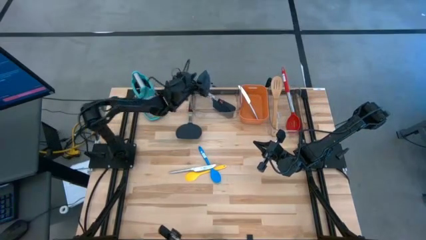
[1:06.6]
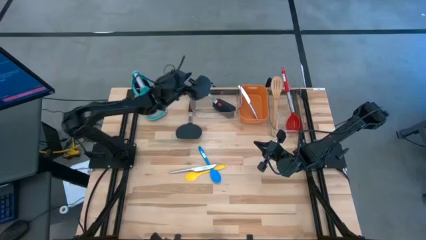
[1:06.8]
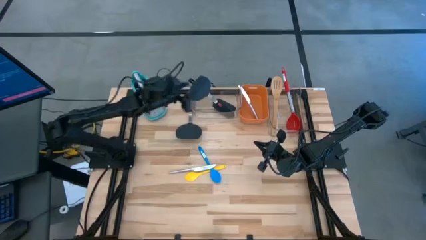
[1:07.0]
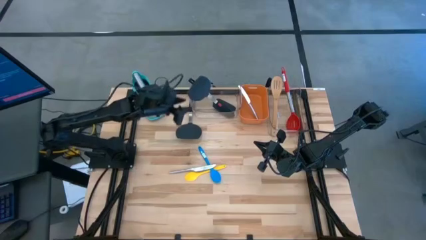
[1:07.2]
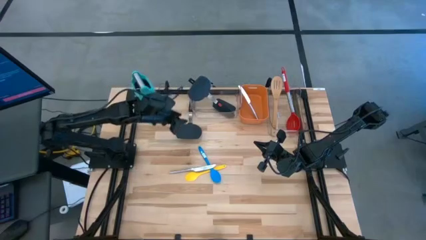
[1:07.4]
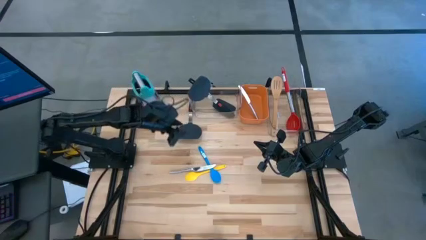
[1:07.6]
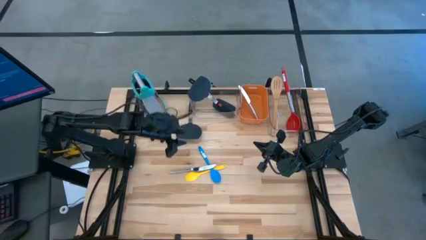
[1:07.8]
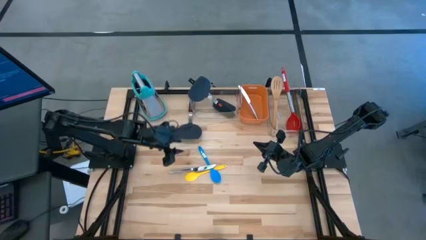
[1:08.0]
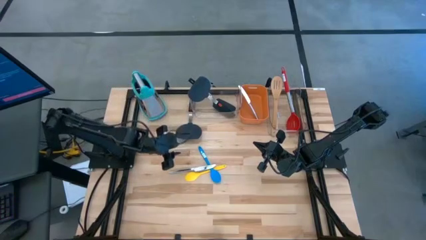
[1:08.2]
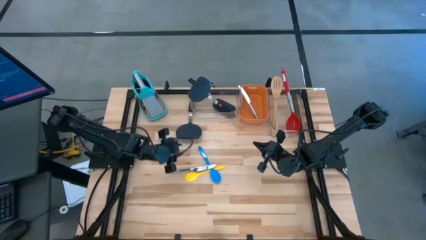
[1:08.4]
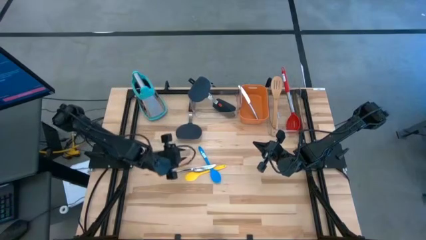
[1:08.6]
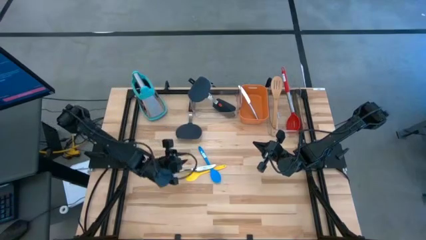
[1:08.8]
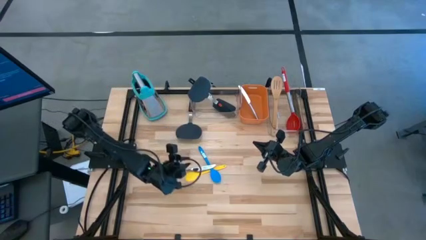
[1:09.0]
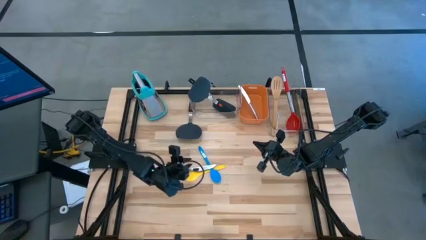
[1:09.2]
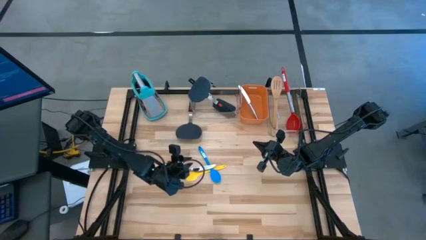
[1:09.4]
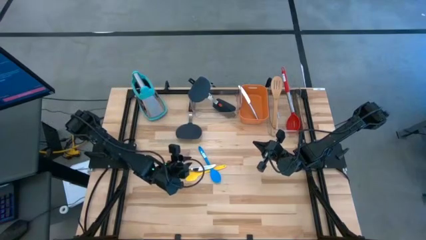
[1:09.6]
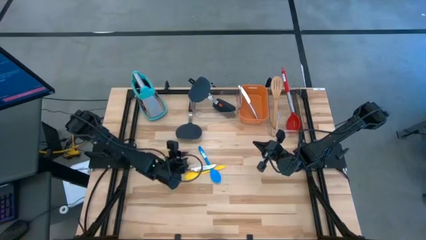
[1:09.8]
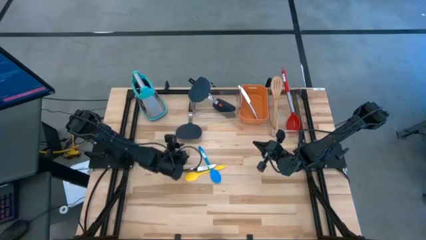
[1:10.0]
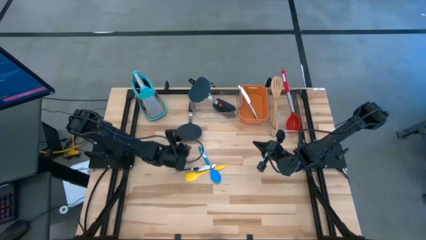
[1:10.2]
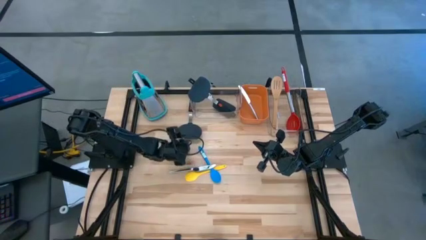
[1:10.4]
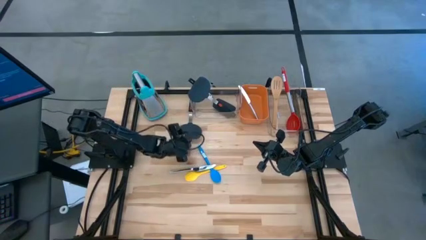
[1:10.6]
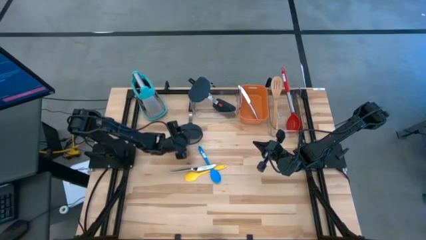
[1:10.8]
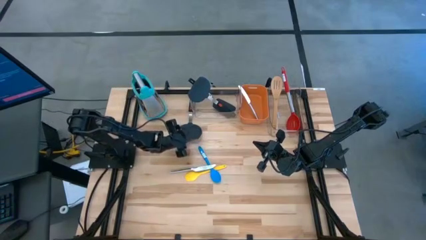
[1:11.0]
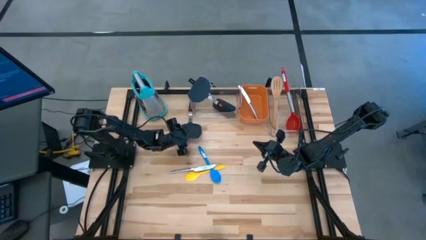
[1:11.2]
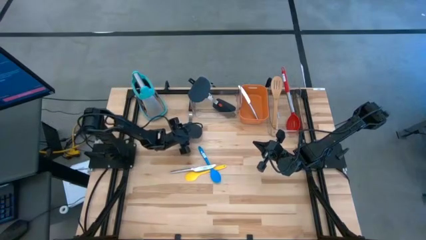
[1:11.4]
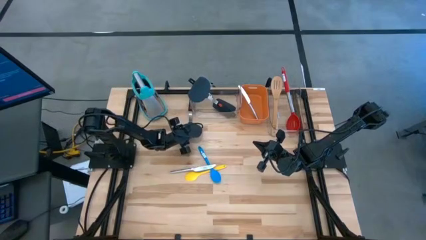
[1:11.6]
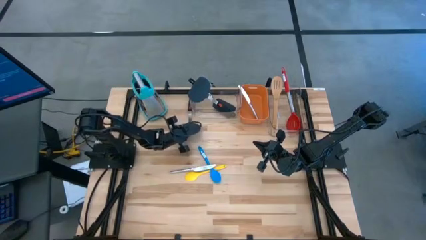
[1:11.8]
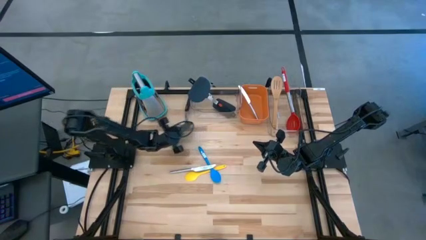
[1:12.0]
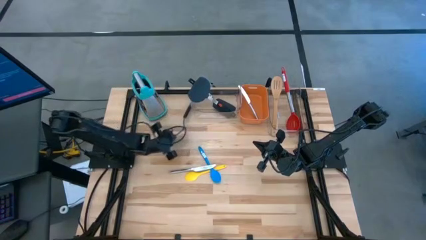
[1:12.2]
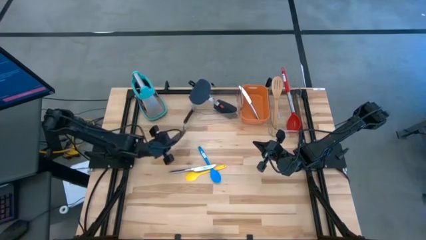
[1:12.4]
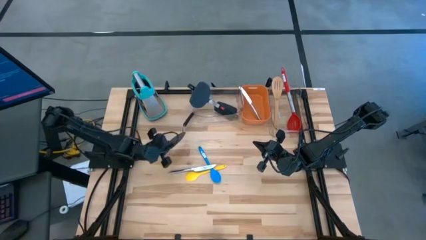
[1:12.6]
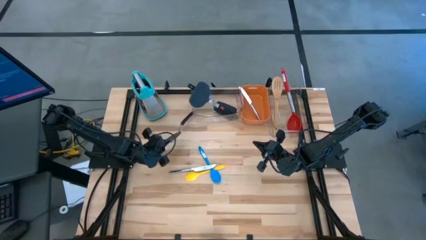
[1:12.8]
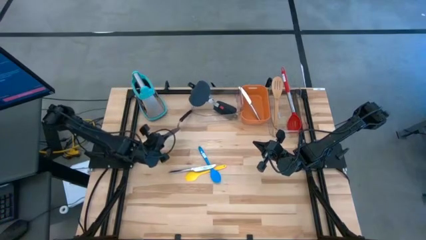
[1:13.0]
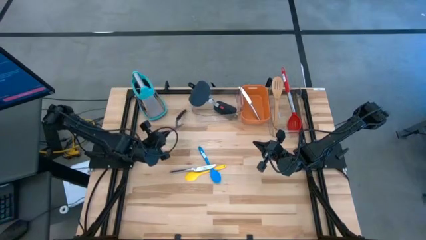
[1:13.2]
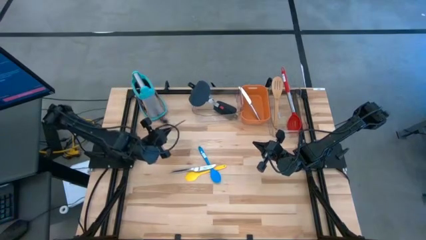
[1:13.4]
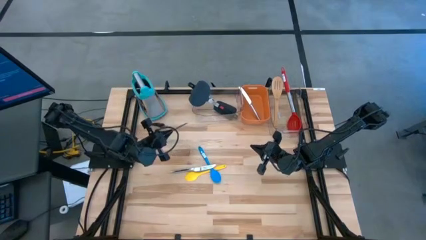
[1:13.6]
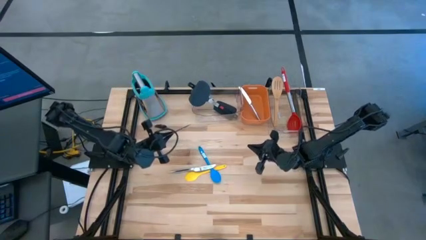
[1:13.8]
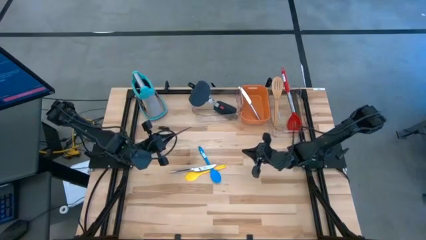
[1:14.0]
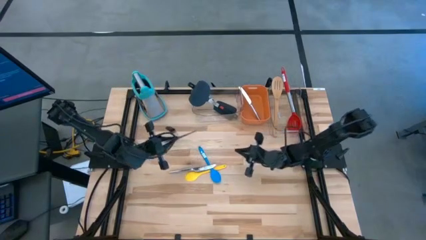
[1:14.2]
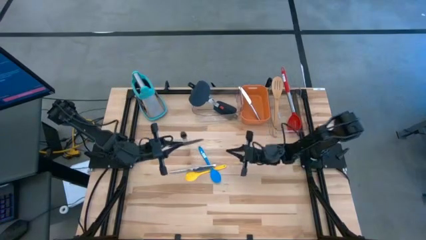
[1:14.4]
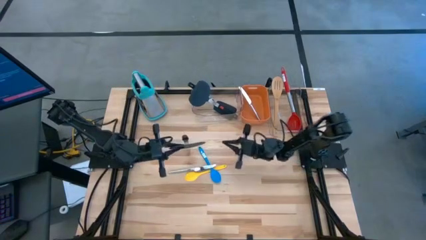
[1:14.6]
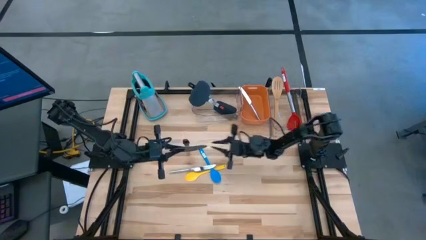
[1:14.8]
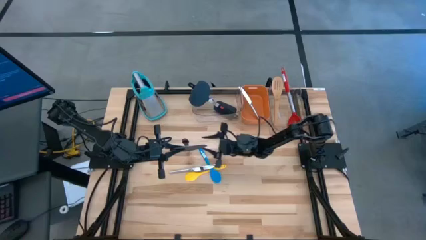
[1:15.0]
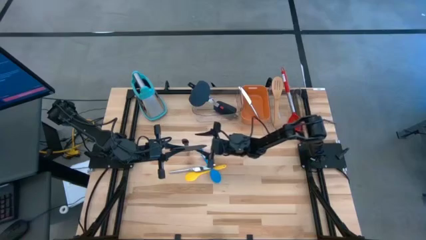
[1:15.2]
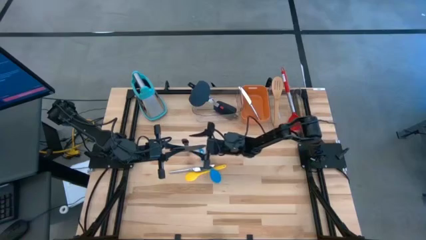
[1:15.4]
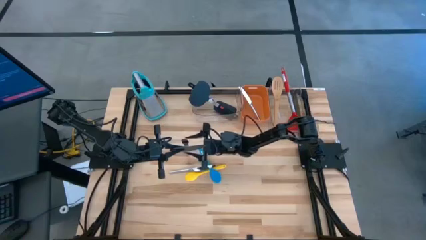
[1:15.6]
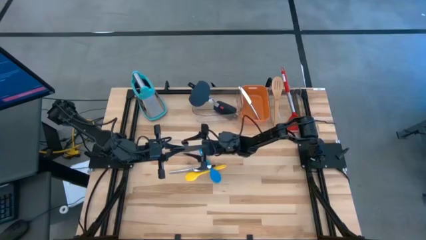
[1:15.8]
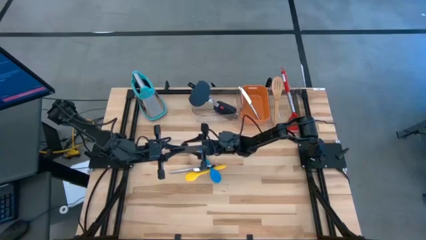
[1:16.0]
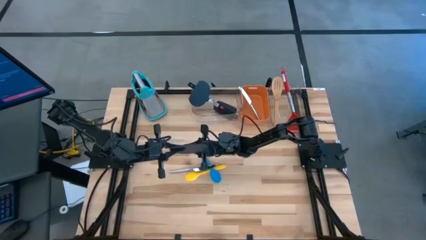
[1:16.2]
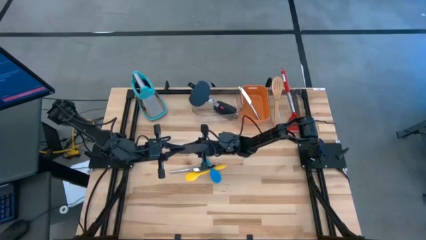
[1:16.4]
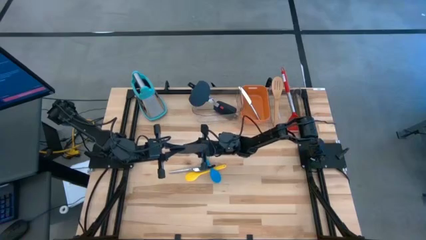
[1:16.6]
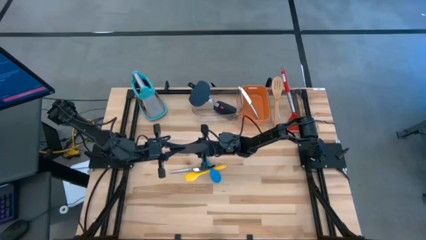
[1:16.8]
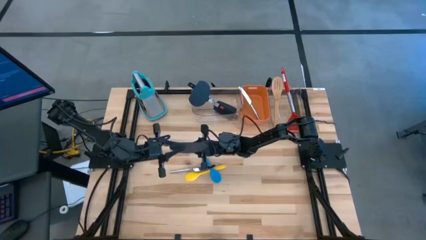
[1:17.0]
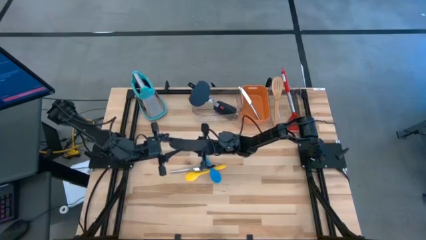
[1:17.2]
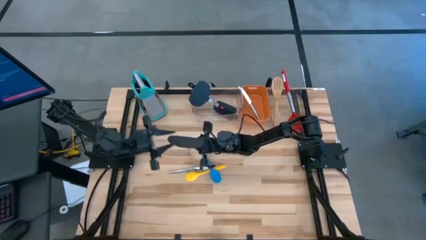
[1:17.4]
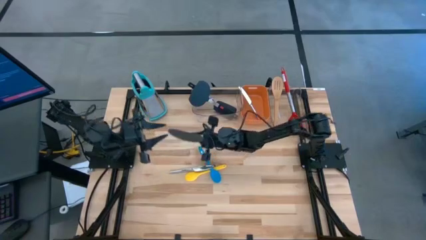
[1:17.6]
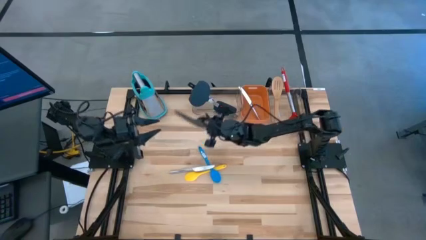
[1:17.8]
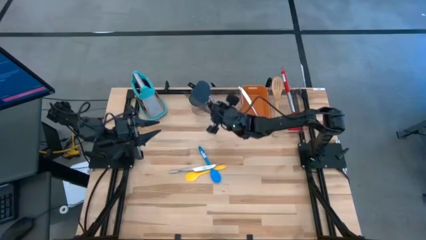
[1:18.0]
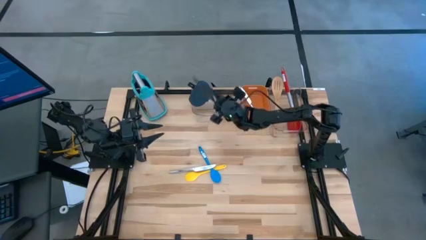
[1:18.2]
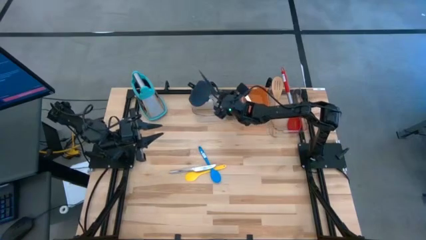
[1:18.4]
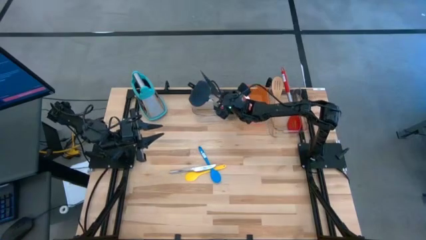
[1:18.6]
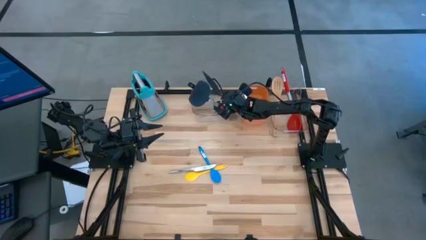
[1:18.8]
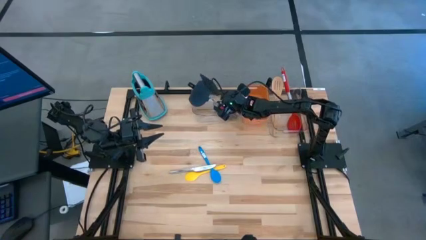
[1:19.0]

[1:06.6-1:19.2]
Task: Pick & Place Kitchen Items
Put the scraper spatula in the left transparent bin
